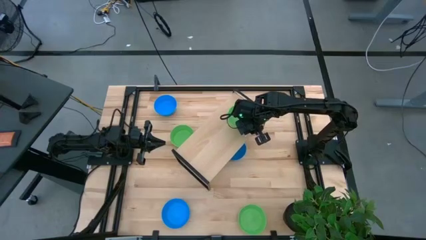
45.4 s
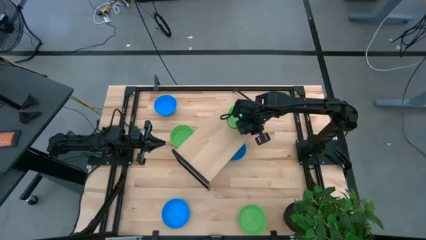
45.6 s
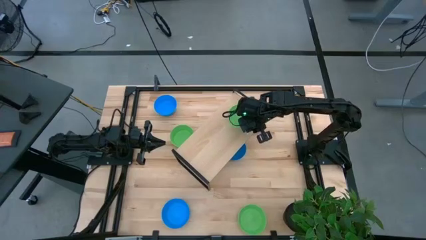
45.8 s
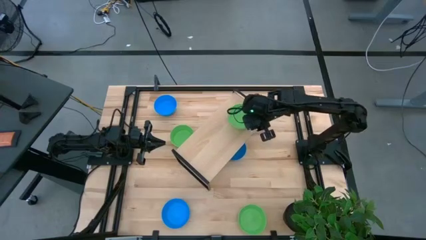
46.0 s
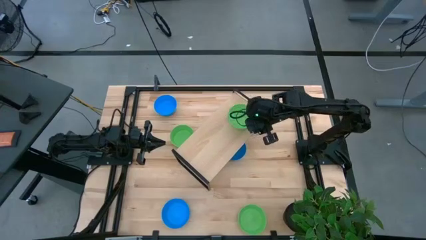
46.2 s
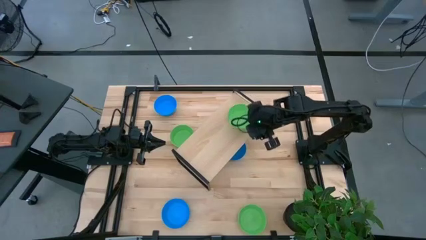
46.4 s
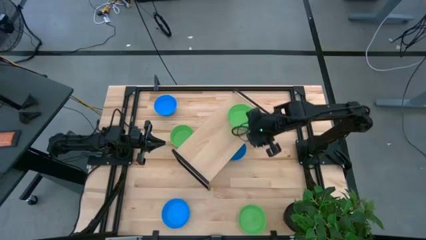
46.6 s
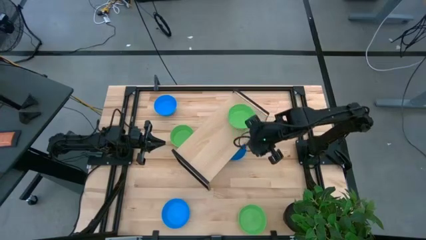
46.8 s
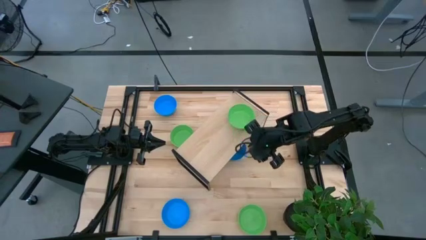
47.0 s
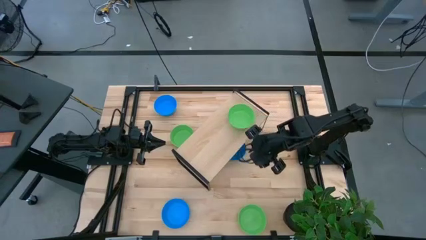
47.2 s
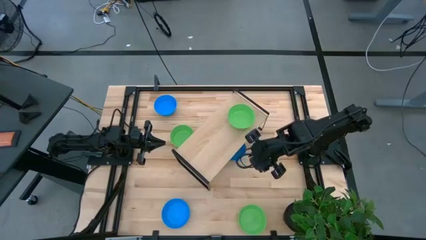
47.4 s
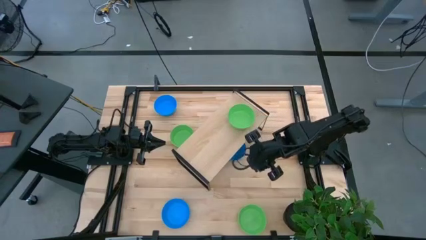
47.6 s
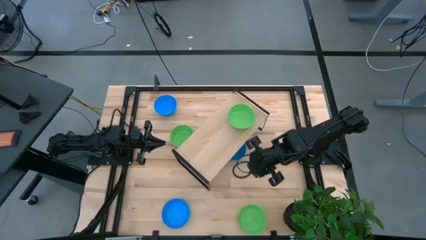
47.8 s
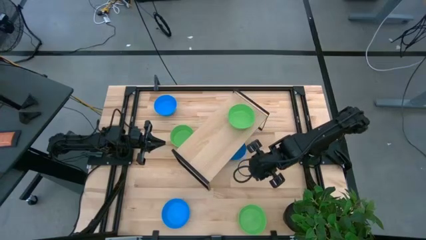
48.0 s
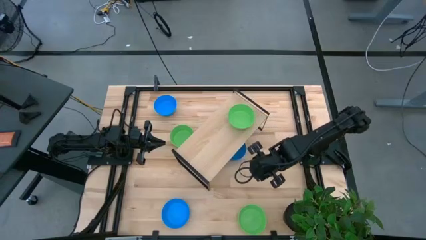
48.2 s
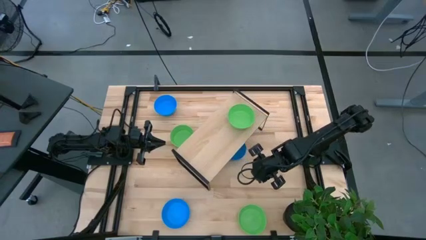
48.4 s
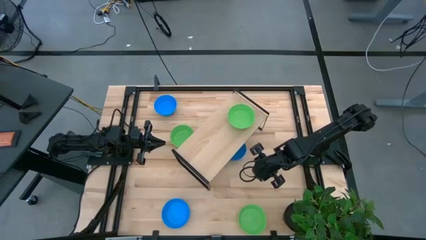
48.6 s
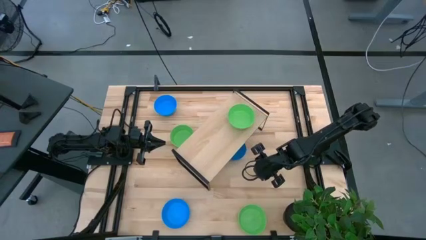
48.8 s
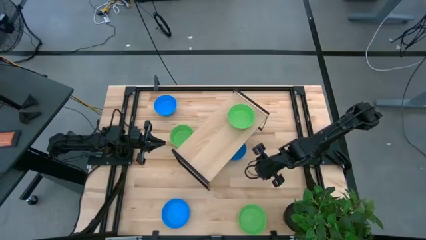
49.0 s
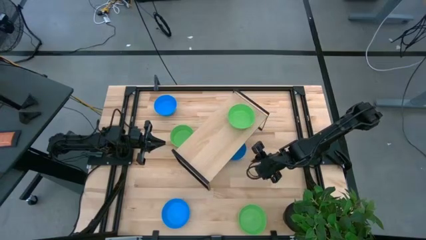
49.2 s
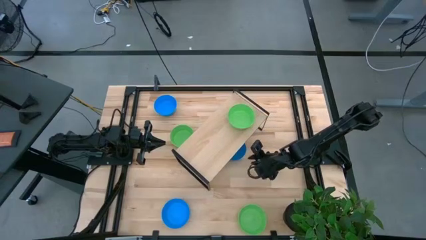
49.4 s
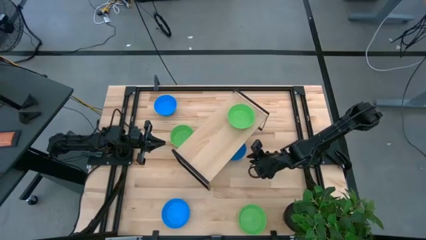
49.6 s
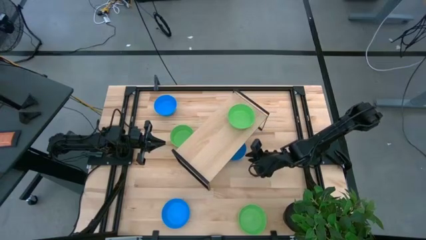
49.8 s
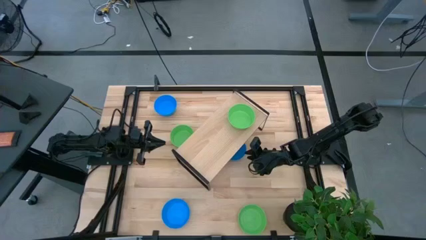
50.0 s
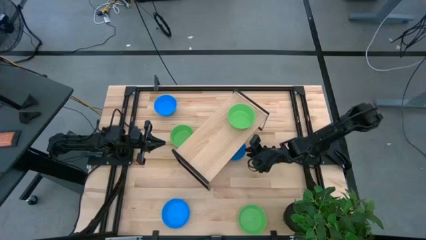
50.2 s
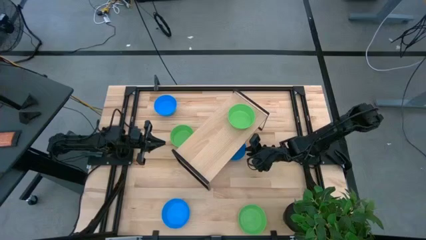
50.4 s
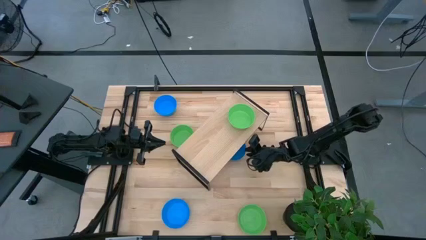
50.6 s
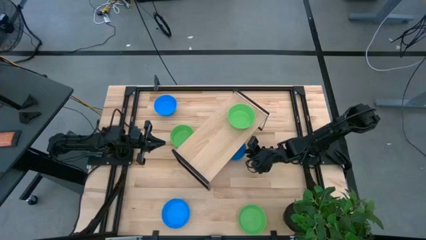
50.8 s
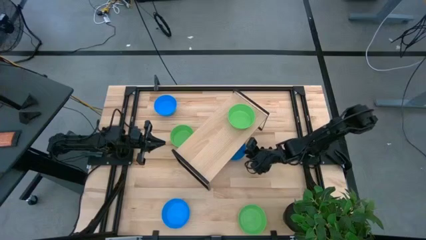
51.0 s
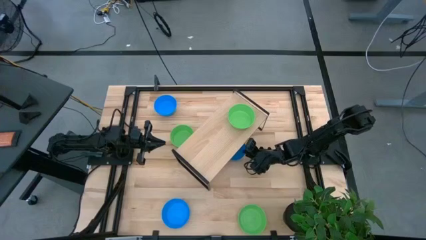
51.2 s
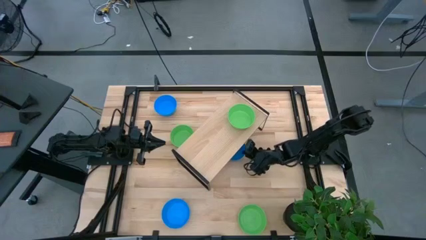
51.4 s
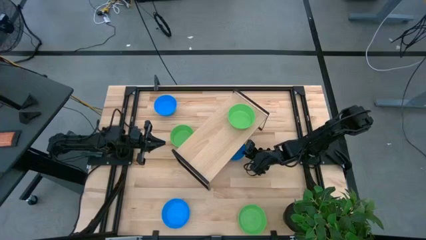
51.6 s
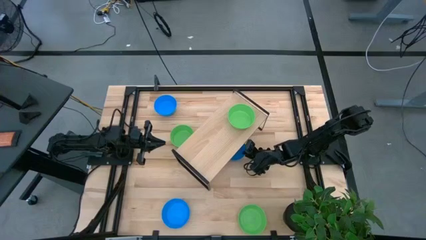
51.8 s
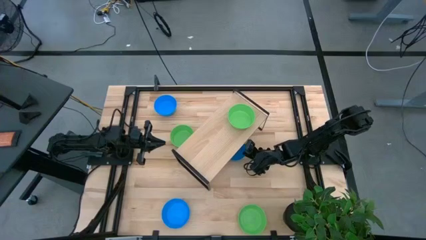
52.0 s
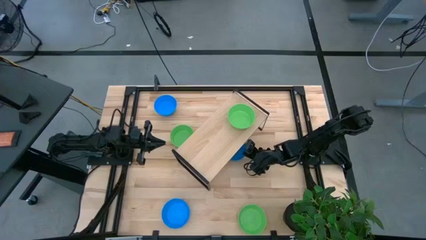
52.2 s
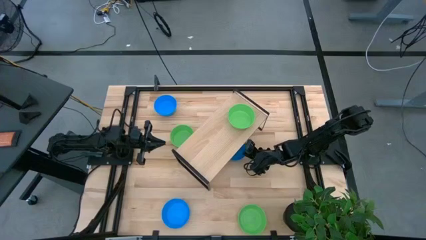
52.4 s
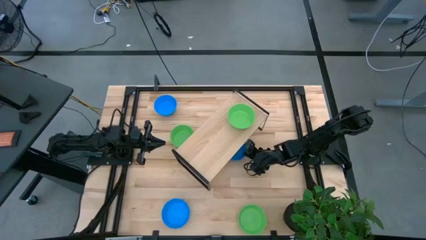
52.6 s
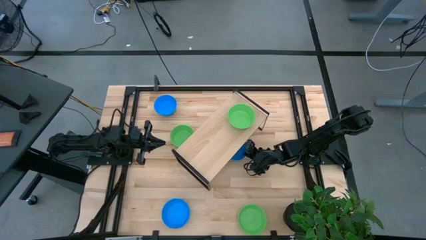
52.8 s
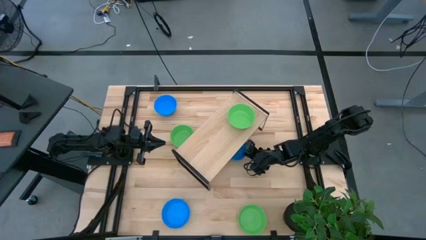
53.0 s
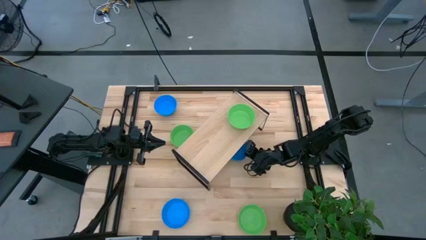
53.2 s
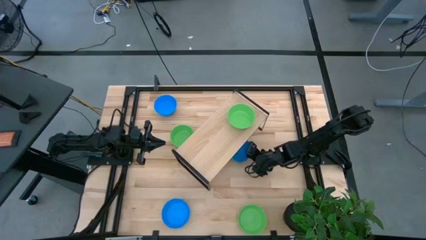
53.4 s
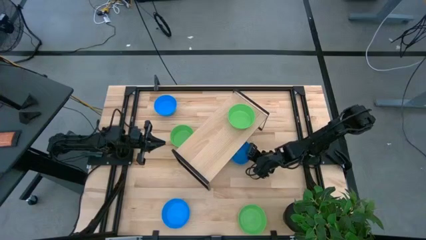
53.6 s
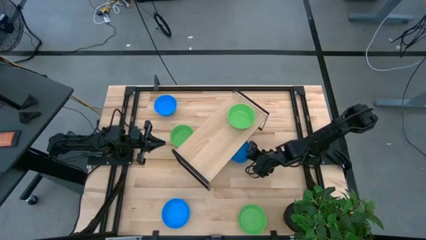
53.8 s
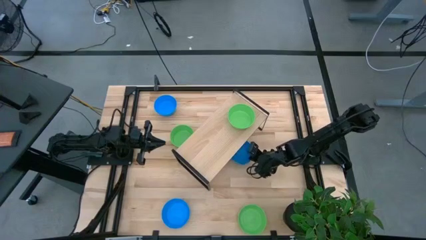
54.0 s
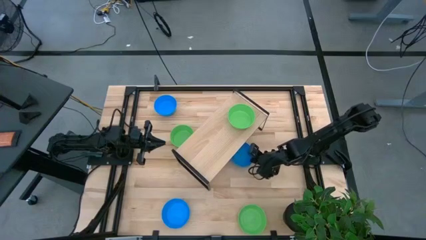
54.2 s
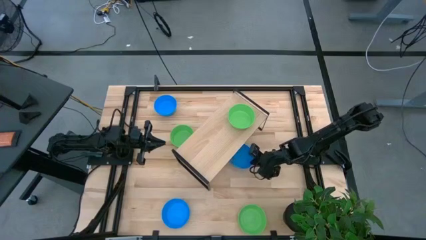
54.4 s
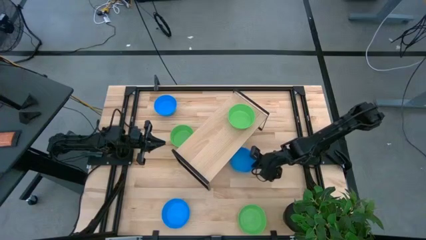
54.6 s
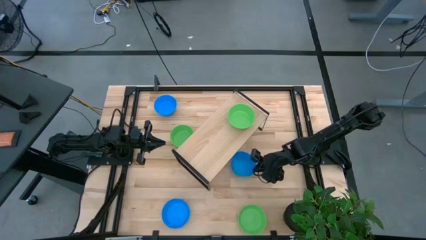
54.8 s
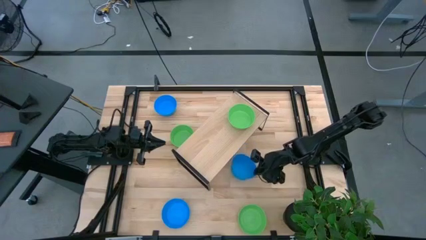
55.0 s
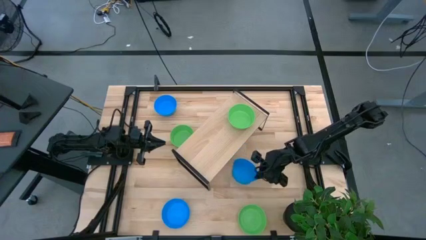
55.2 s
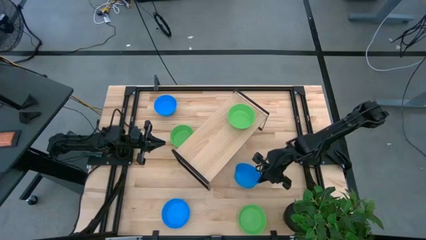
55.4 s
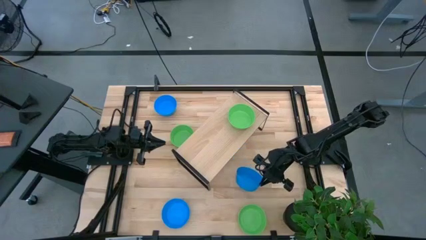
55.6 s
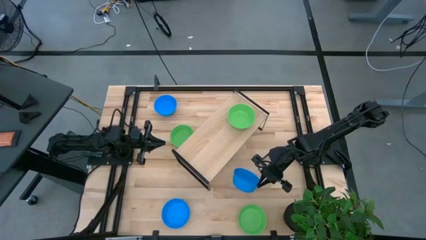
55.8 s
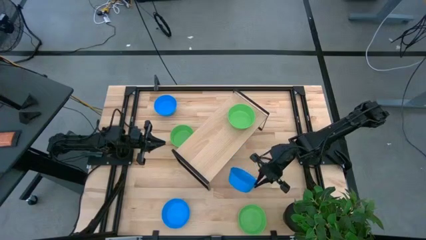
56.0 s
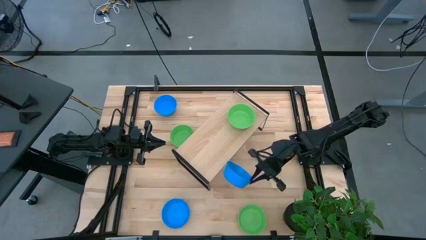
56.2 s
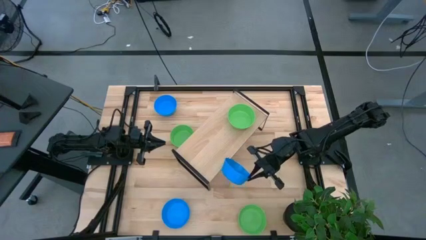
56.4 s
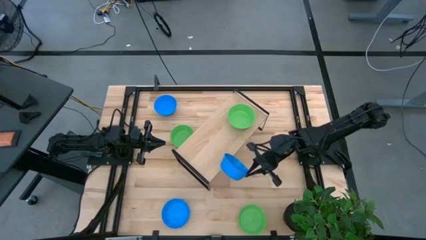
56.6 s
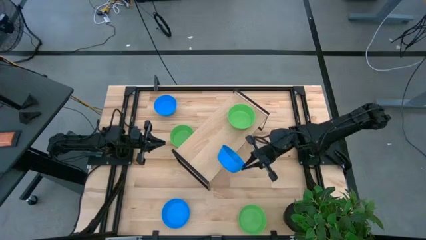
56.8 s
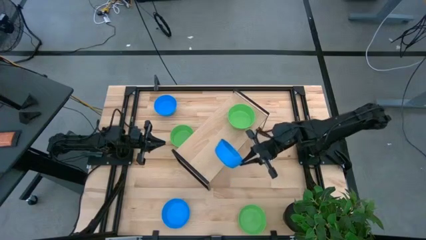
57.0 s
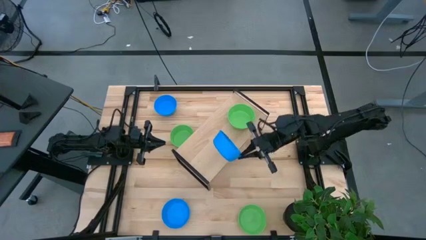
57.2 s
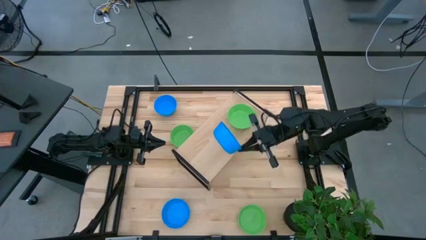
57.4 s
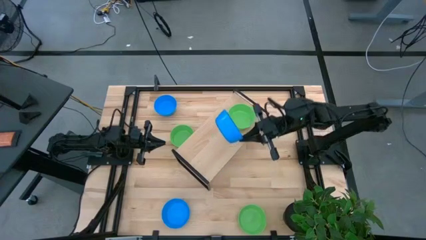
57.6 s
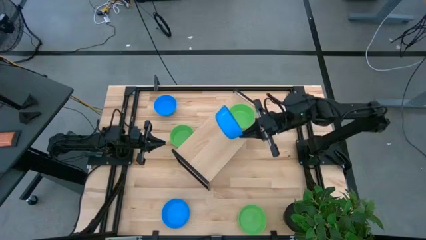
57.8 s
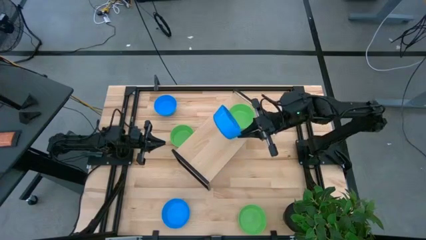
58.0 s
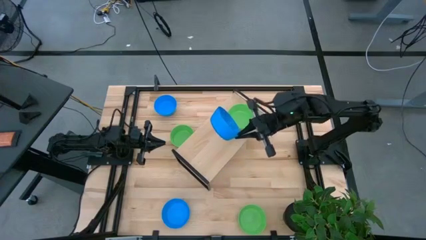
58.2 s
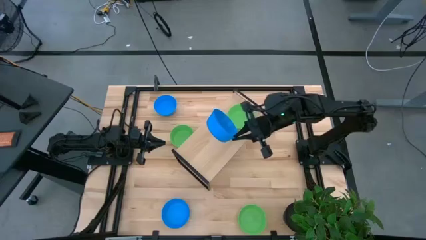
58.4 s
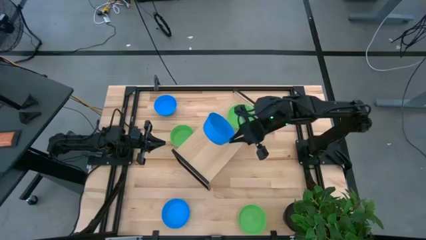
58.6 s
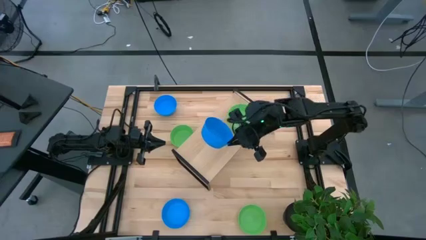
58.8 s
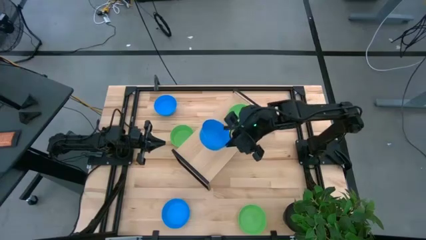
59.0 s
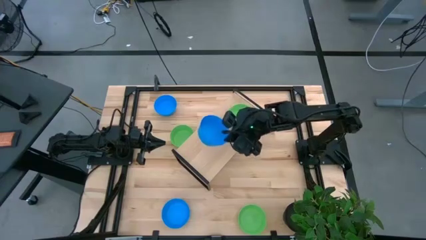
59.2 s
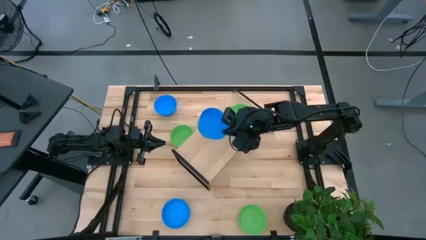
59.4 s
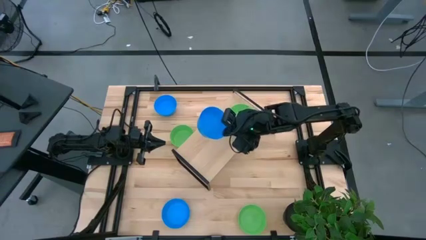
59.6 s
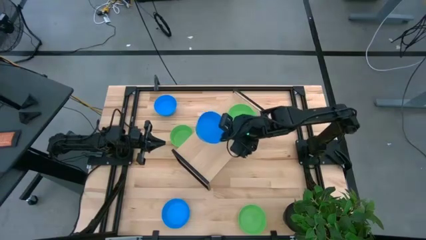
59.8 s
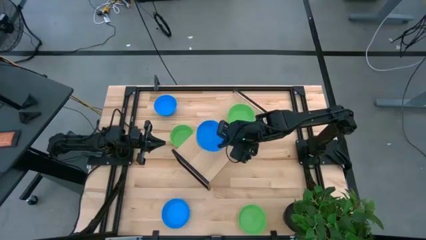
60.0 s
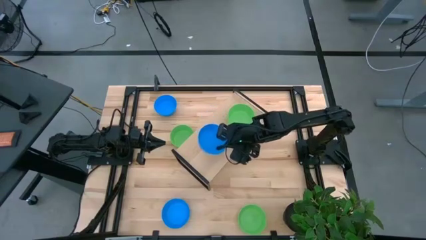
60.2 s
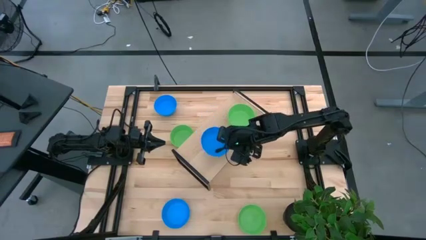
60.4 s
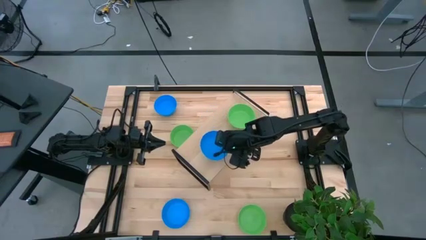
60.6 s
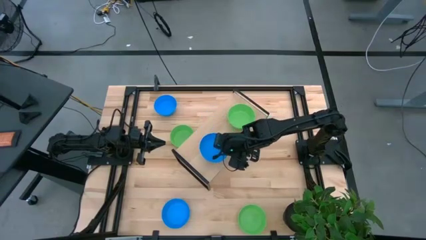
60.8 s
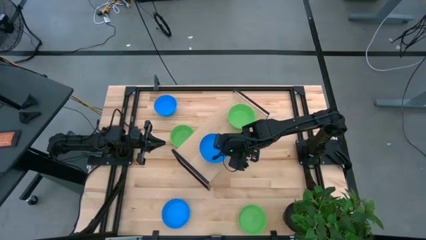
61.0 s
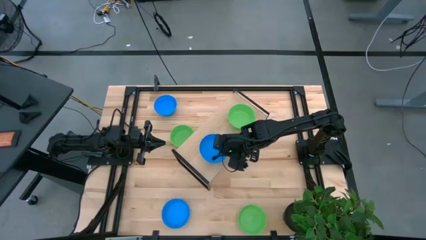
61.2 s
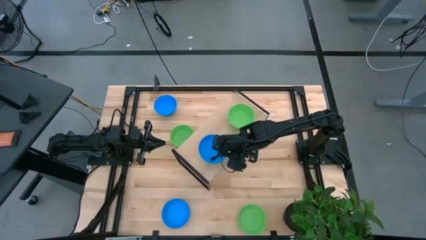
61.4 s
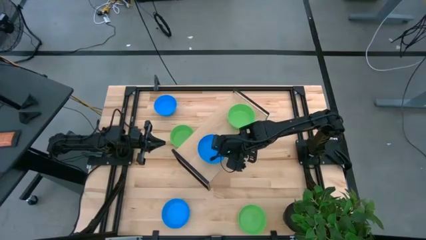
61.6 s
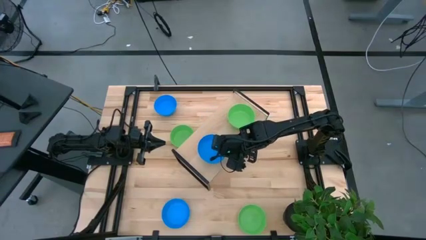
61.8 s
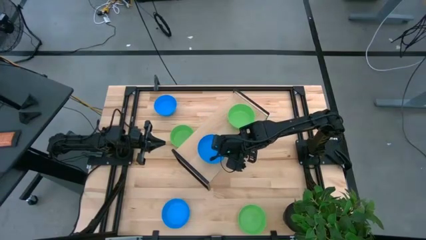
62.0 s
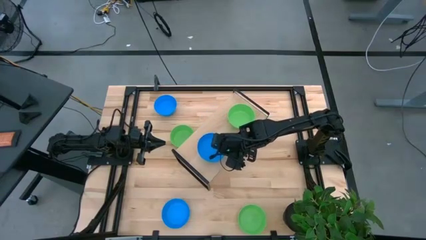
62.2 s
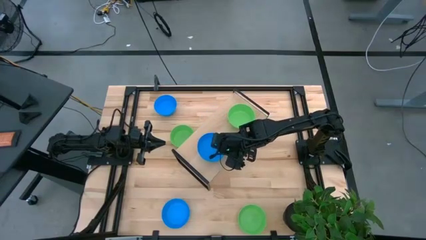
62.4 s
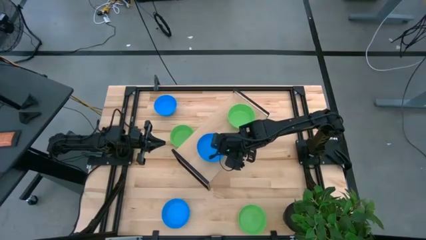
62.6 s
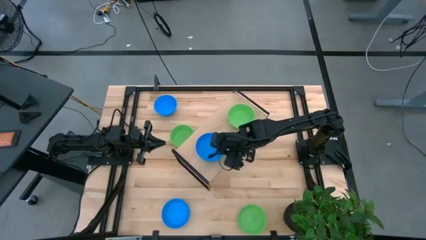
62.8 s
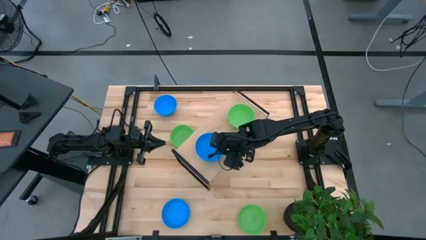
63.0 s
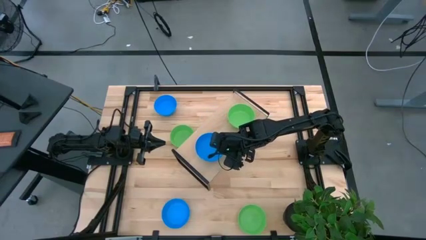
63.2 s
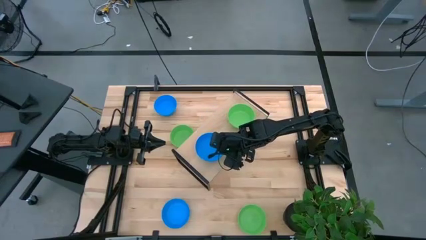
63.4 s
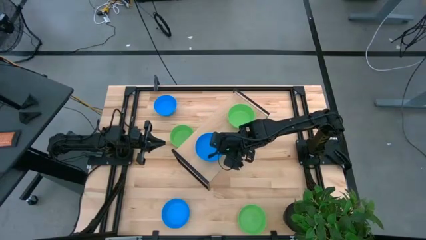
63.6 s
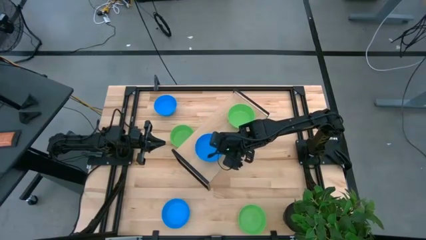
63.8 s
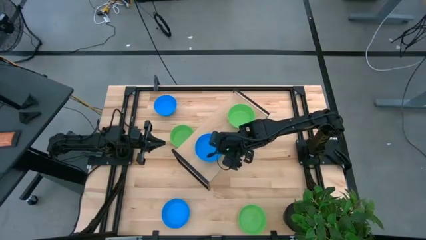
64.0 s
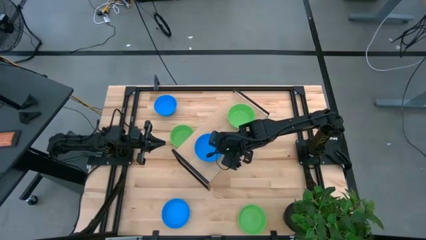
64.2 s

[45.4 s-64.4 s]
Task: Pick & Place Mini bowls
Put the middle right blue bowl on the shelf
